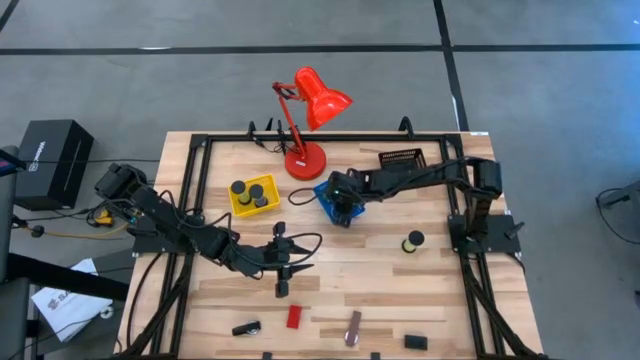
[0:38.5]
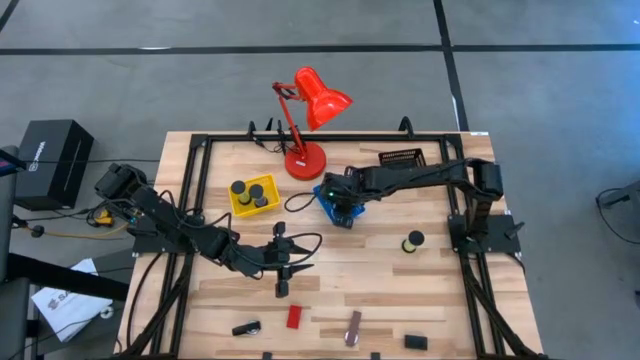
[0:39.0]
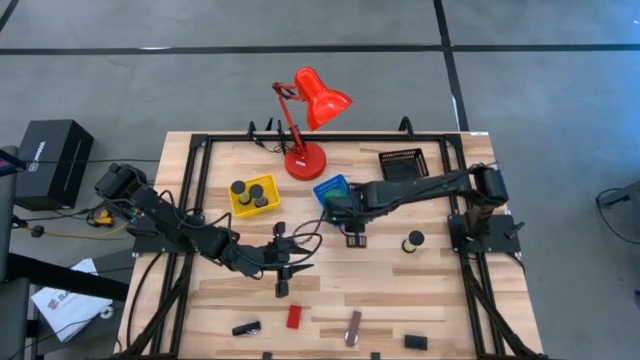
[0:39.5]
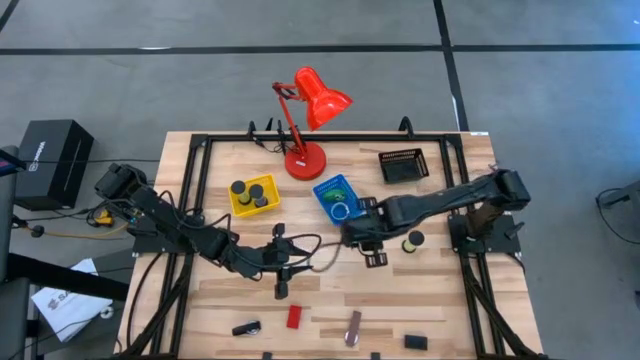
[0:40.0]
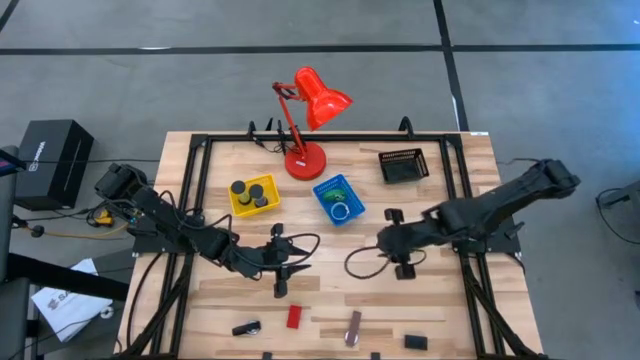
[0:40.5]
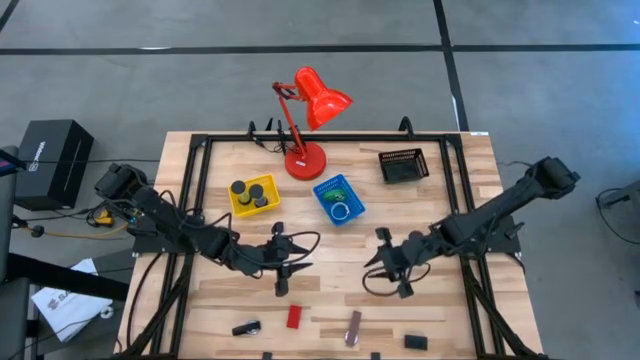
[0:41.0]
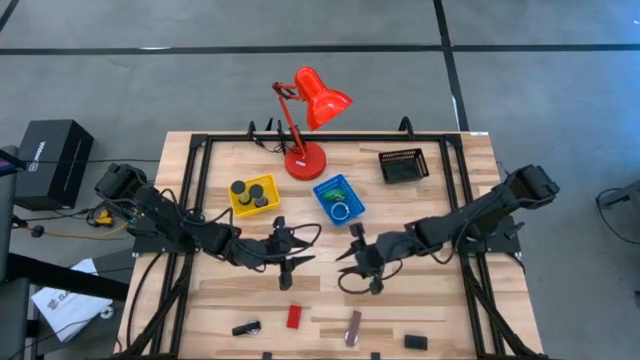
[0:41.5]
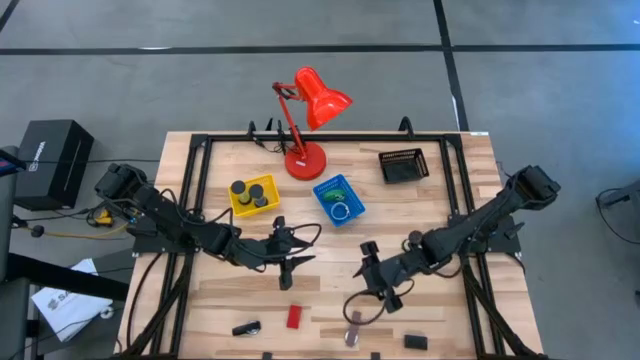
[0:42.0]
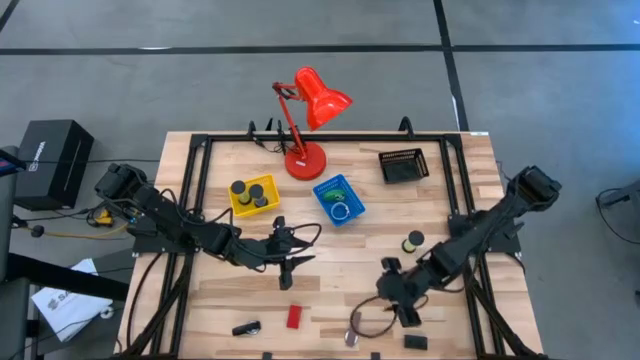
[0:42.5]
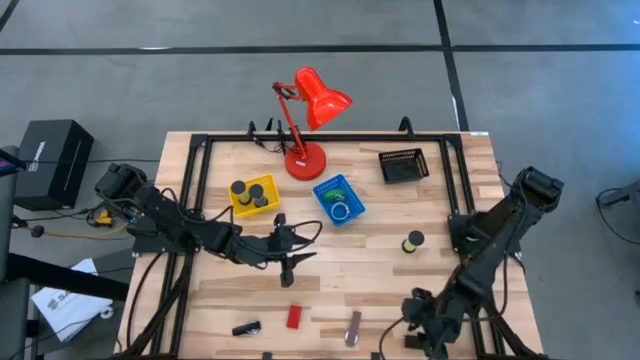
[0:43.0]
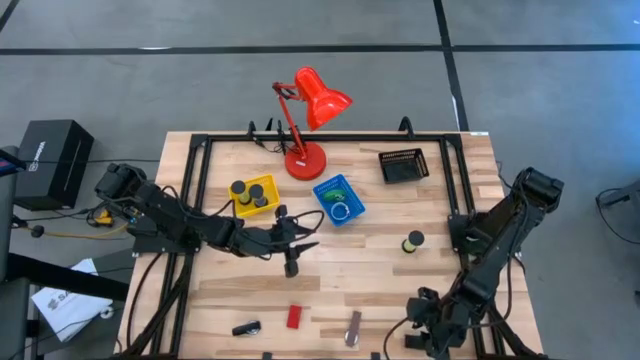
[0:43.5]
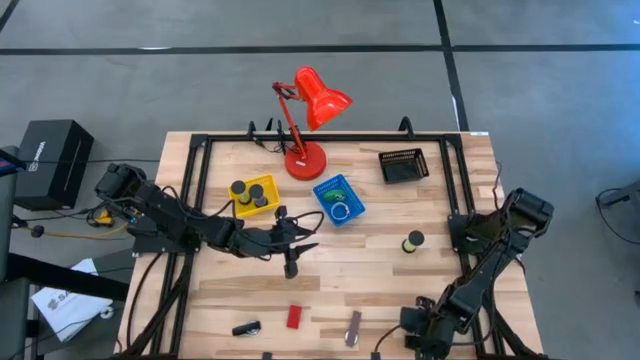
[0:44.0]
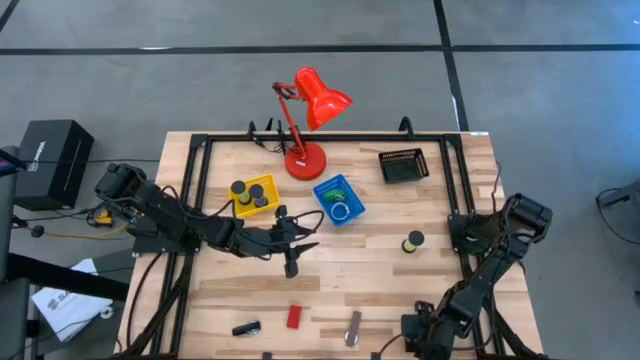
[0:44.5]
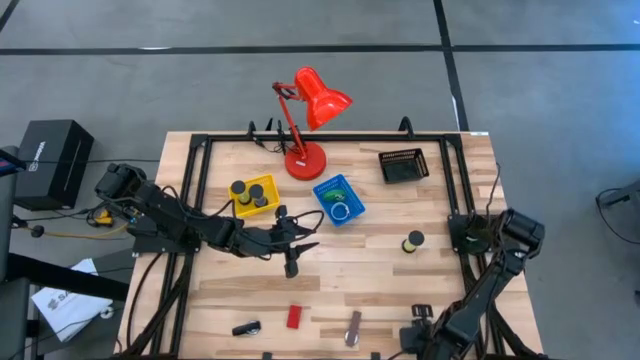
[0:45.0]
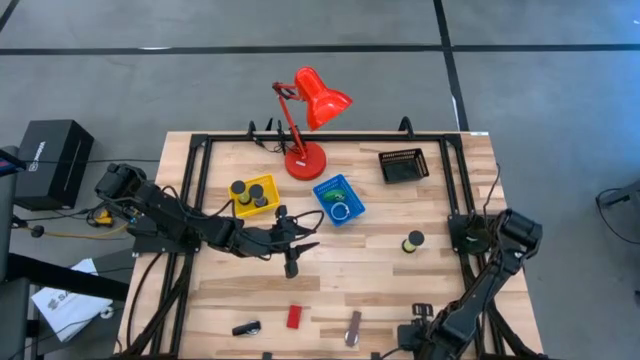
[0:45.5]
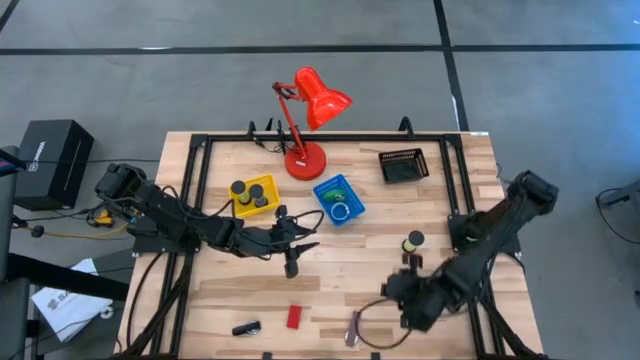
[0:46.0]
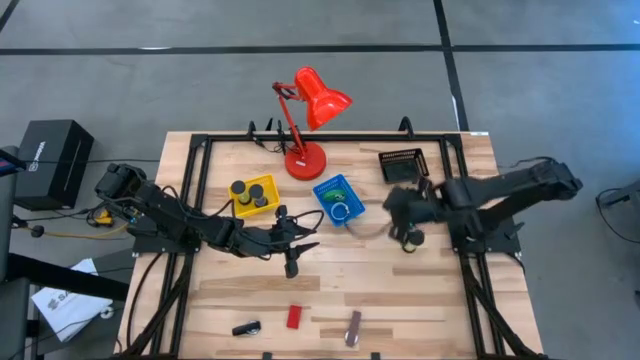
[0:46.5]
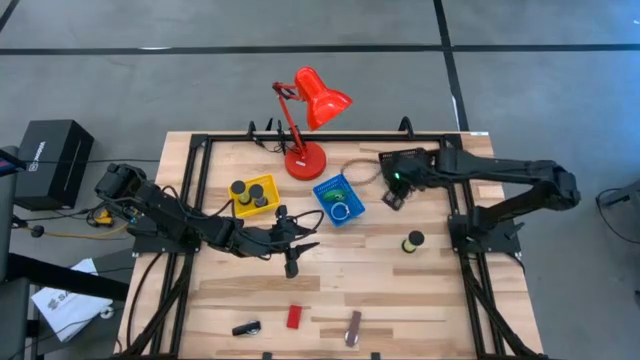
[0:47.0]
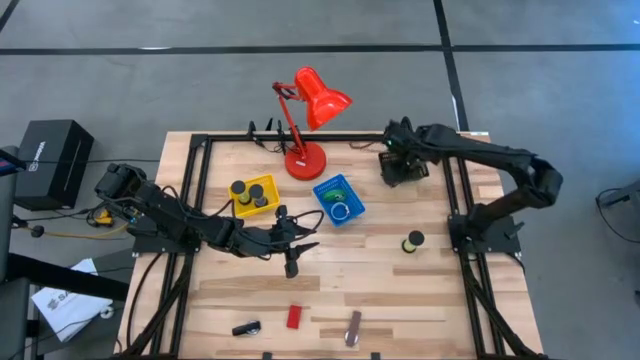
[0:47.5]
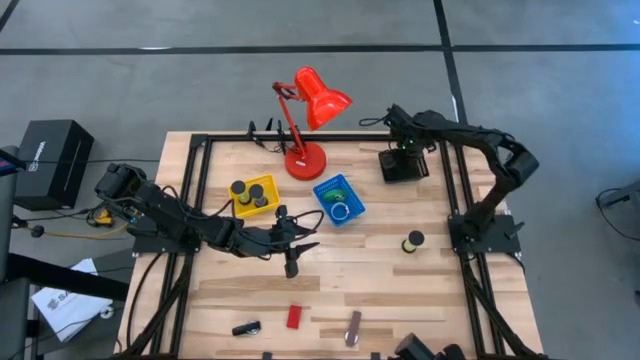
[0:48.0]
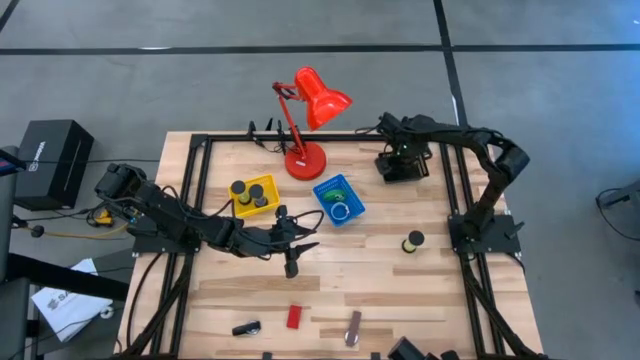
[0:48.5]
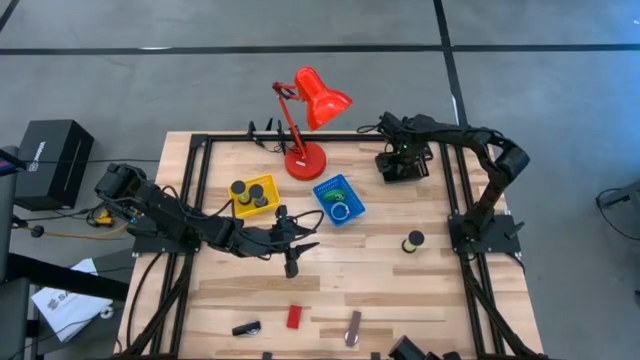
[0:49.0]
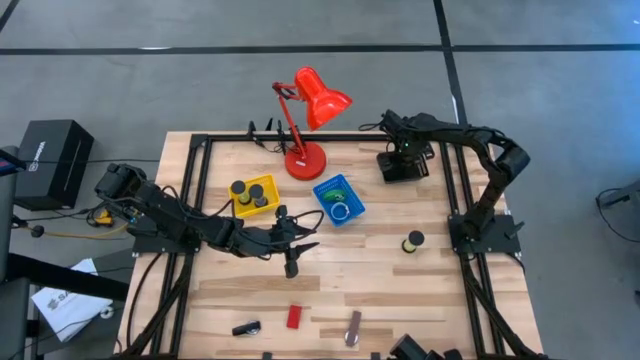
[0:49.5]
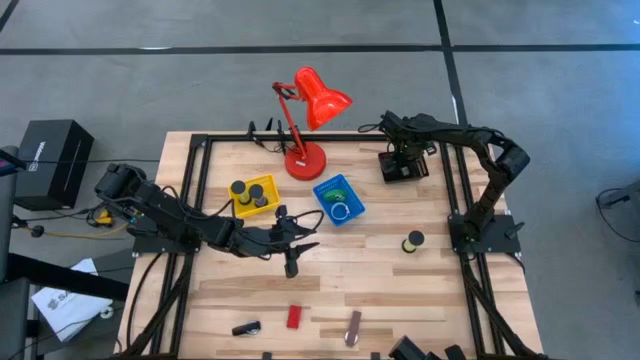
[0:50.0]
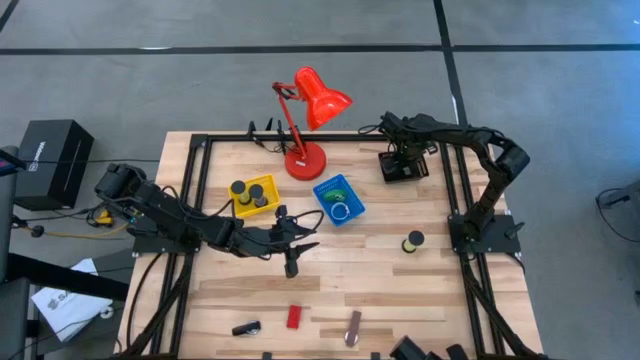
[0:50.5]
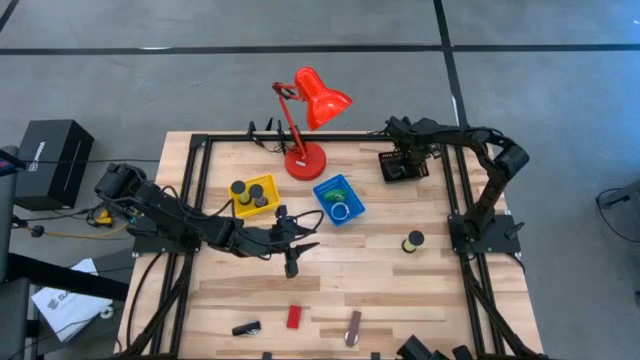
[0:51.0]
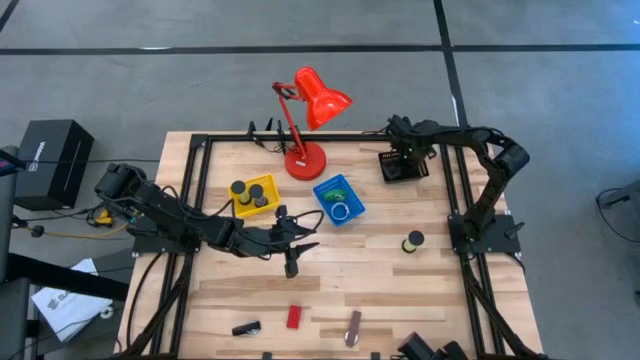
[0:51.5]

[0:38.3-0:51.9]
Task: Pick & Place Office items
Put the black digital clock into the black bin

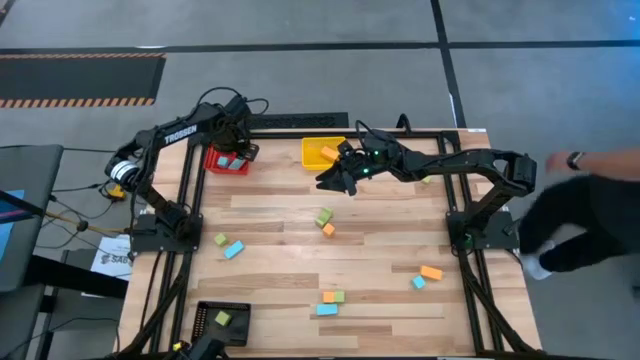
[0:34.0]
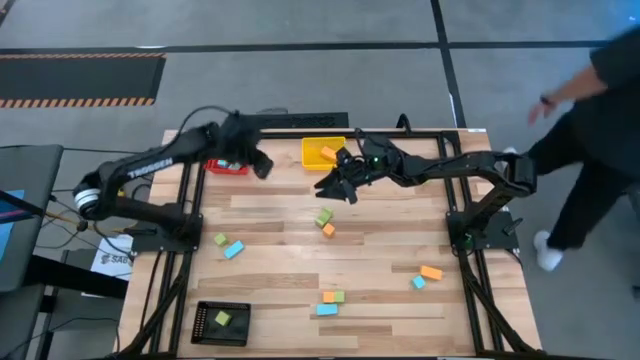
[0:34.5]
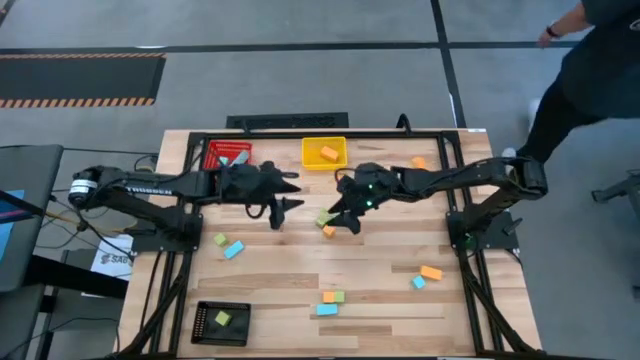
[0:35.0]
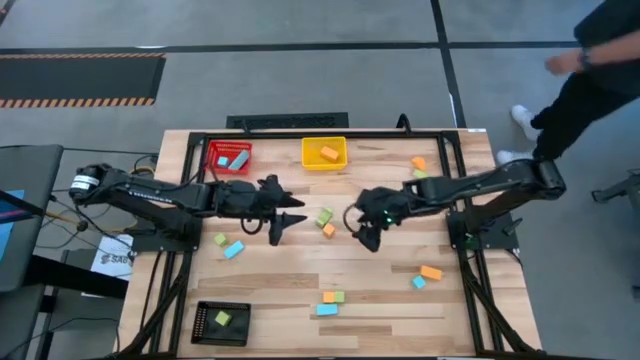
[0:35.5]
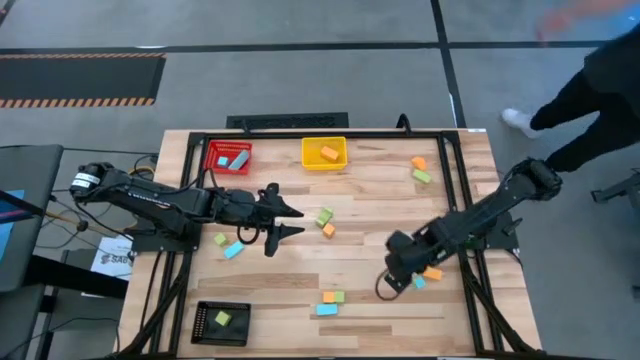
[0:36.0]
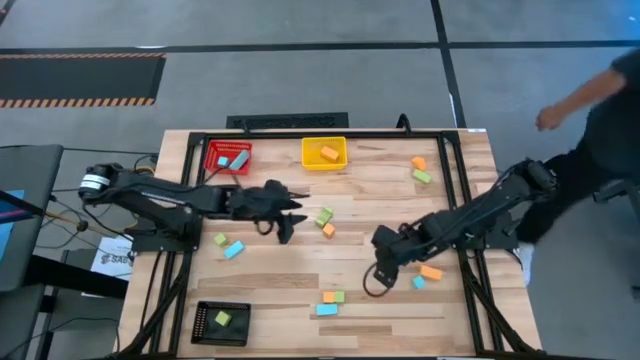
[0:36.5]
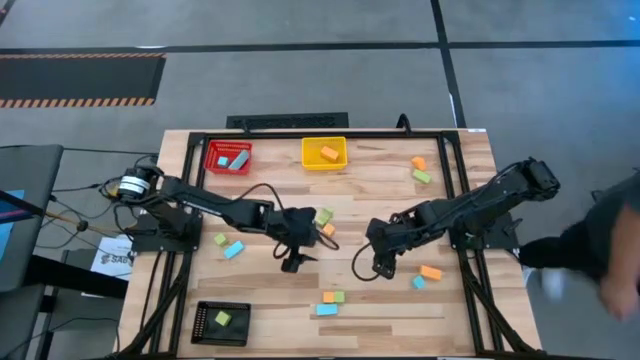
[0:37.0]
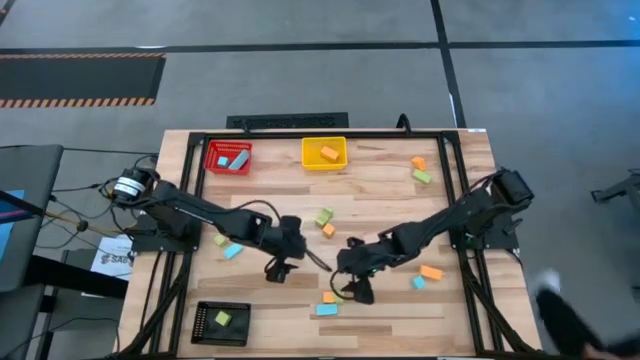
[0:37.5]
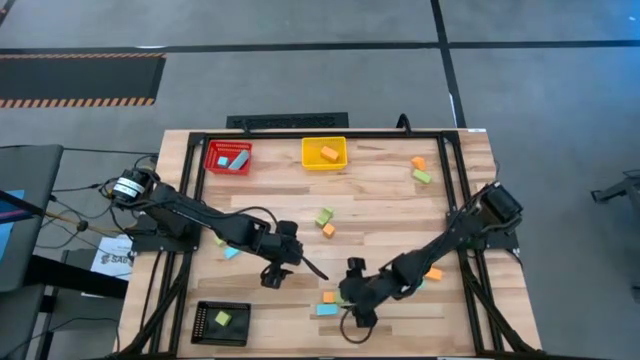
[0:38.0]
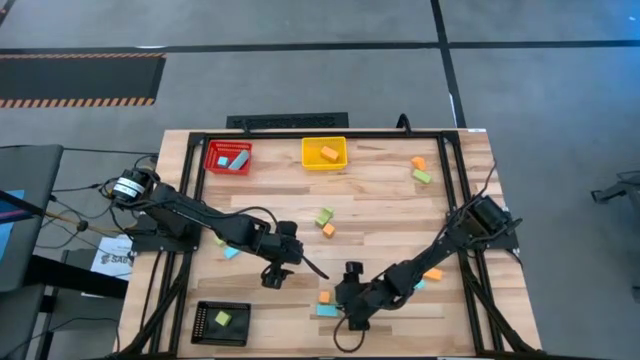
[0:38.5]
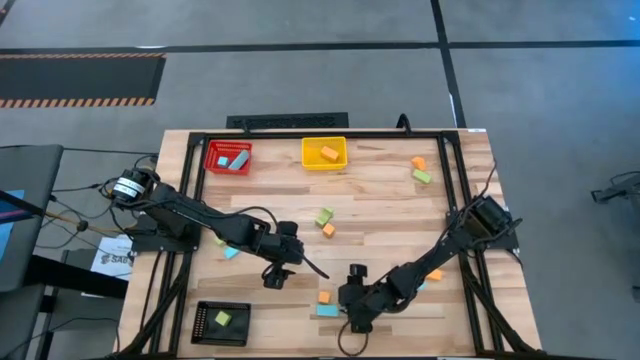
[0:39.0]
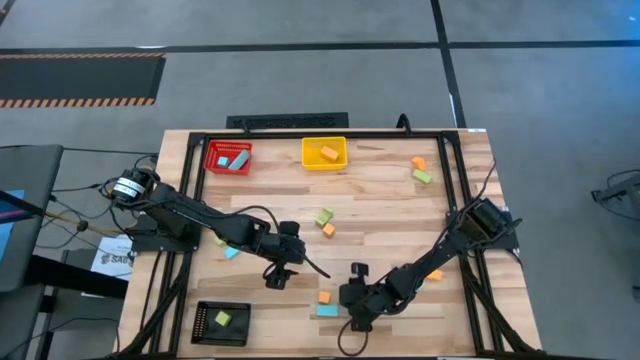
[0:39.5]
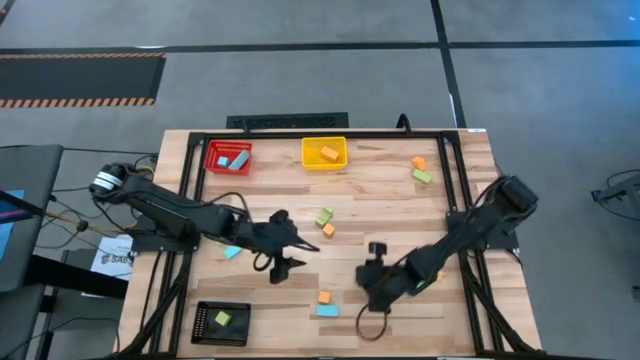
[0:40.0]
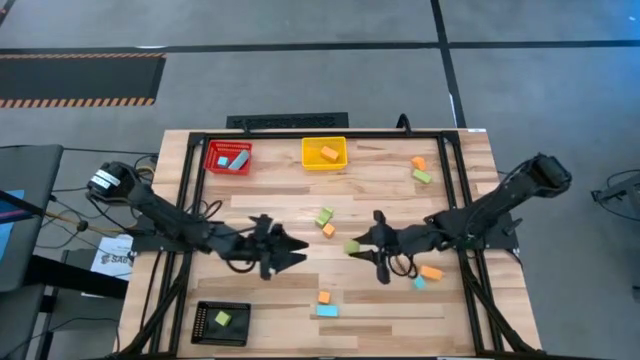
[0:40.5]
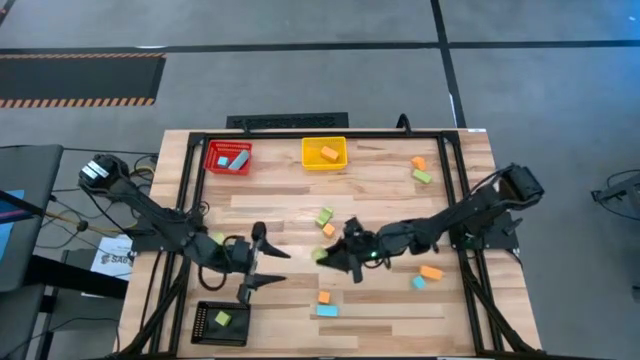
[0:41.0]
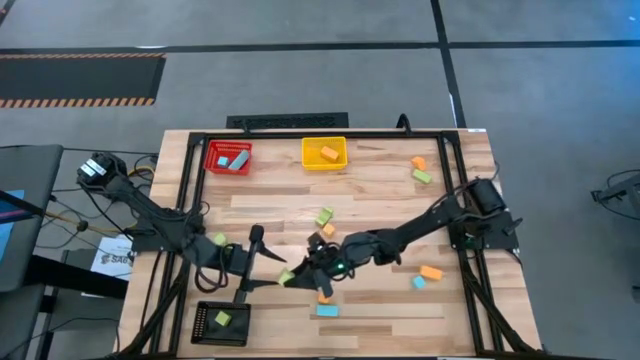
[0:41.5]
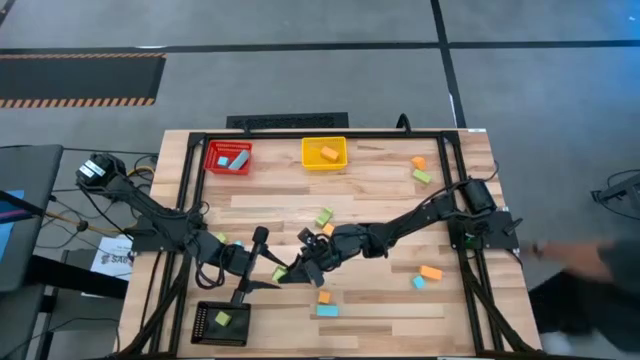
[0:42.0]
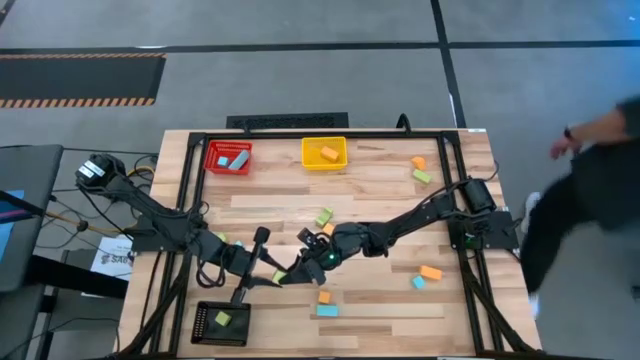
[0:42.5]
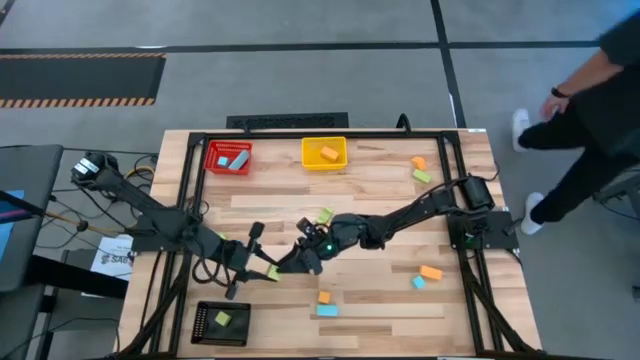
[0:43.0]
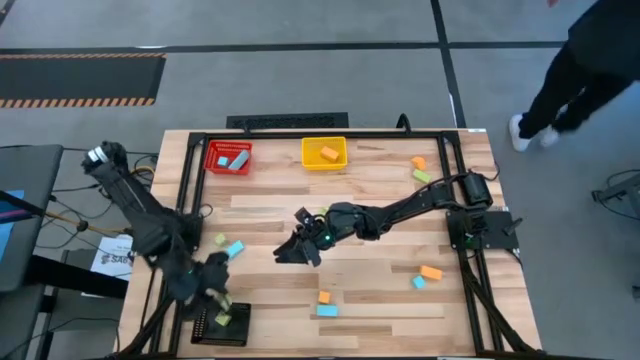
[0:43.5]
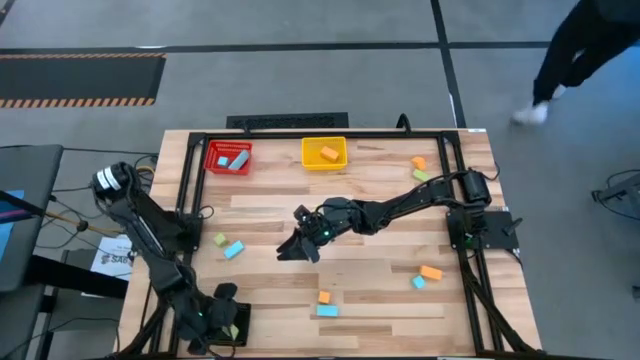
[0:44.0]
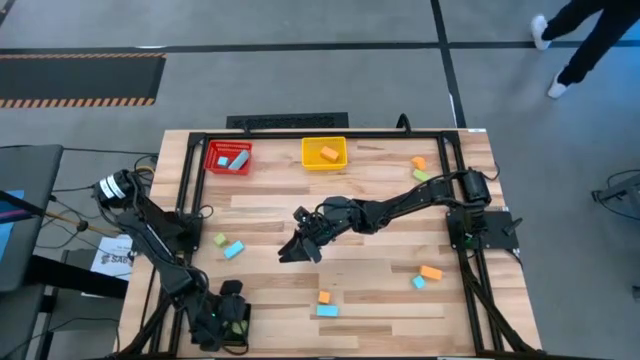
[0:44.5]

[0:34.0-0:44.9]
Task: Sort & place blocks by color
Put the wooden green block into the black bin
